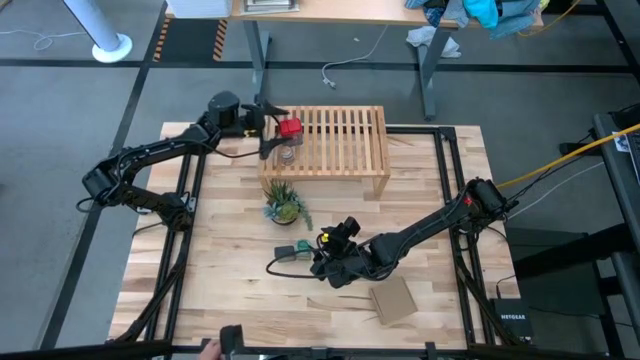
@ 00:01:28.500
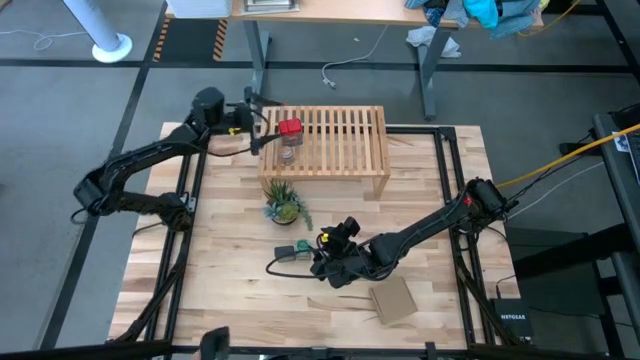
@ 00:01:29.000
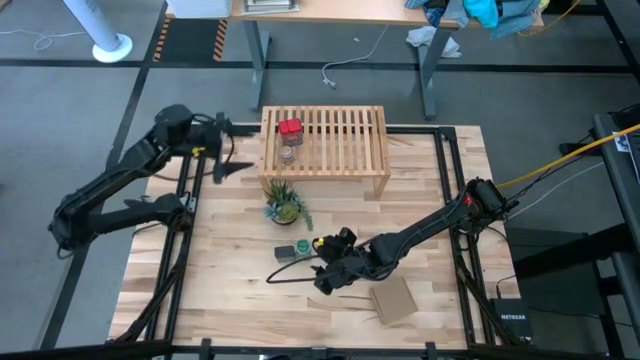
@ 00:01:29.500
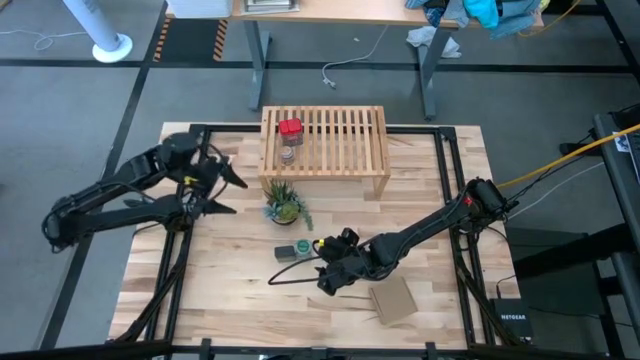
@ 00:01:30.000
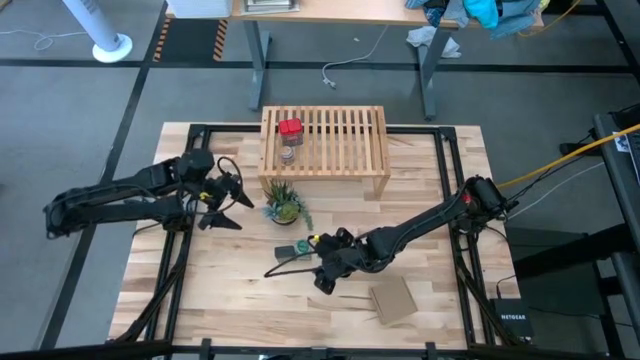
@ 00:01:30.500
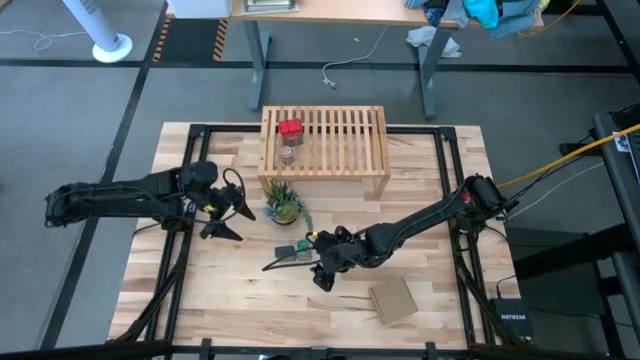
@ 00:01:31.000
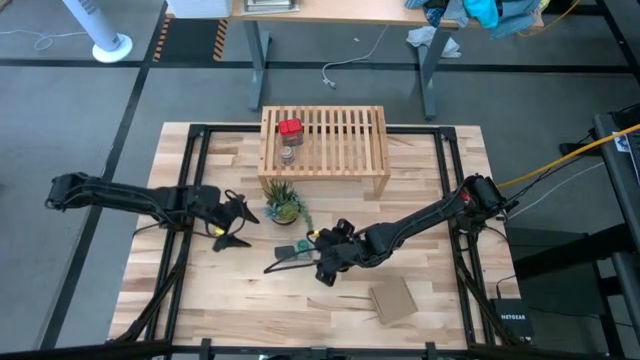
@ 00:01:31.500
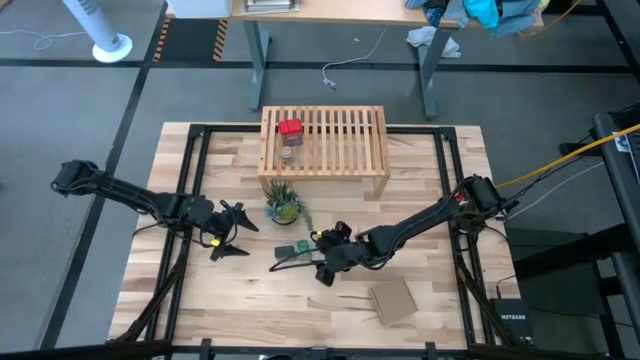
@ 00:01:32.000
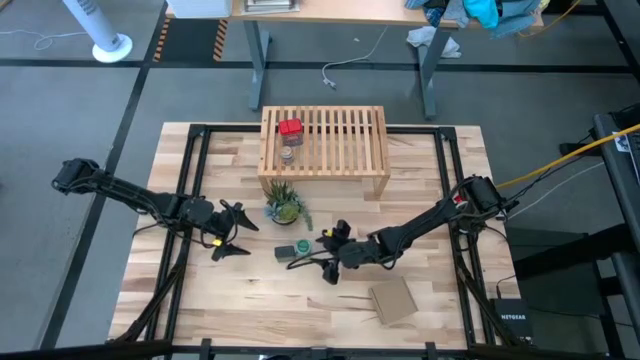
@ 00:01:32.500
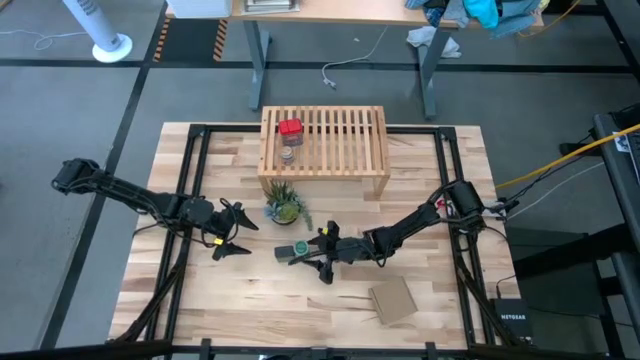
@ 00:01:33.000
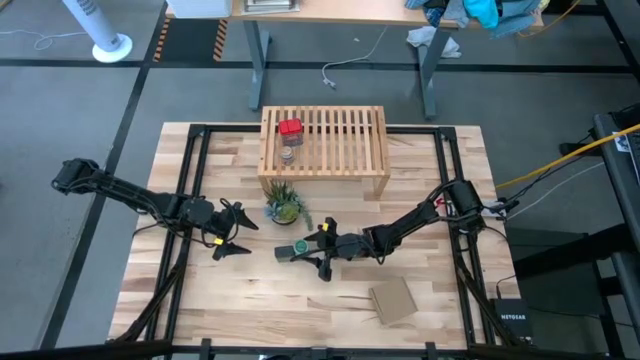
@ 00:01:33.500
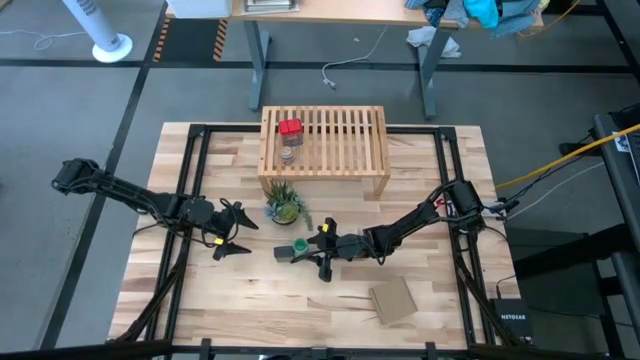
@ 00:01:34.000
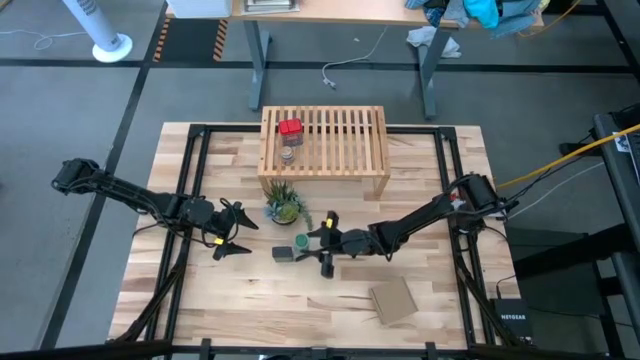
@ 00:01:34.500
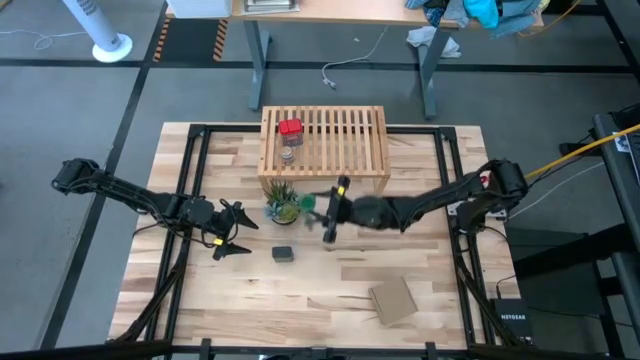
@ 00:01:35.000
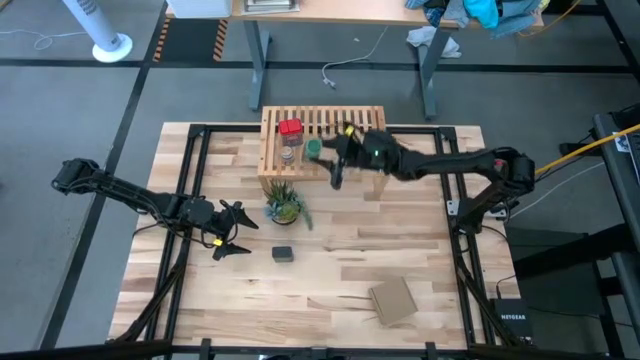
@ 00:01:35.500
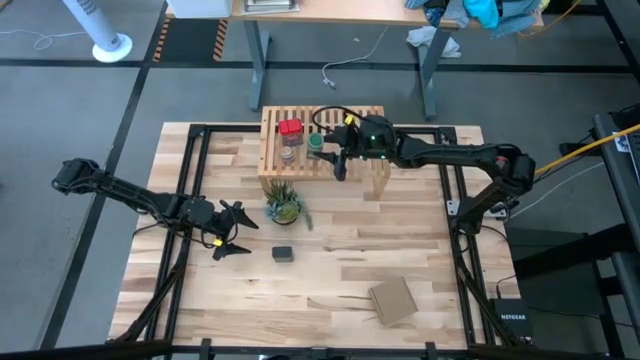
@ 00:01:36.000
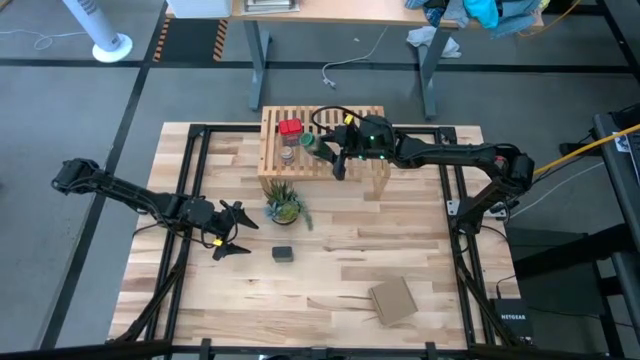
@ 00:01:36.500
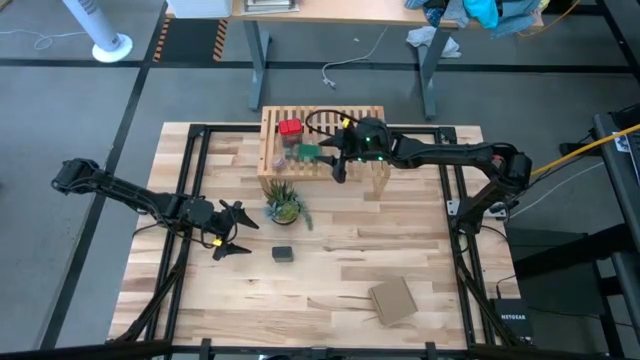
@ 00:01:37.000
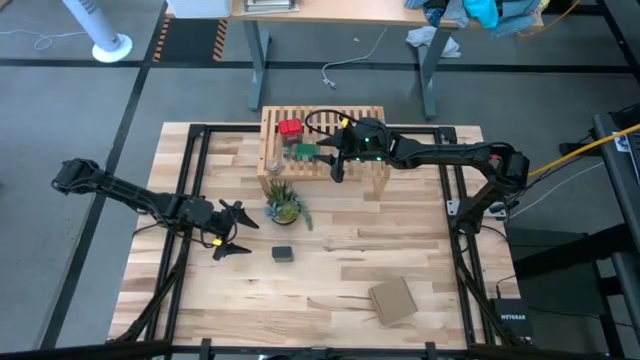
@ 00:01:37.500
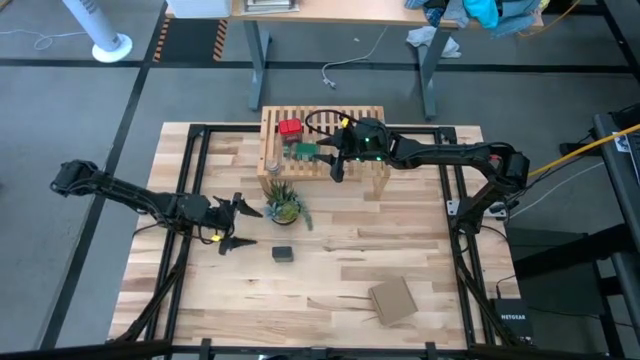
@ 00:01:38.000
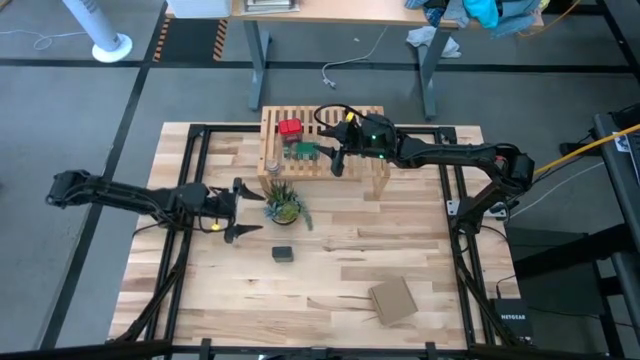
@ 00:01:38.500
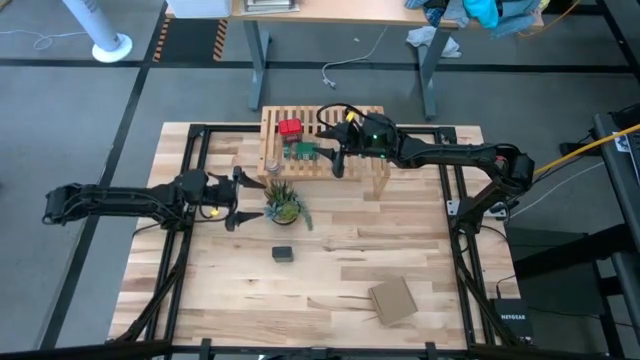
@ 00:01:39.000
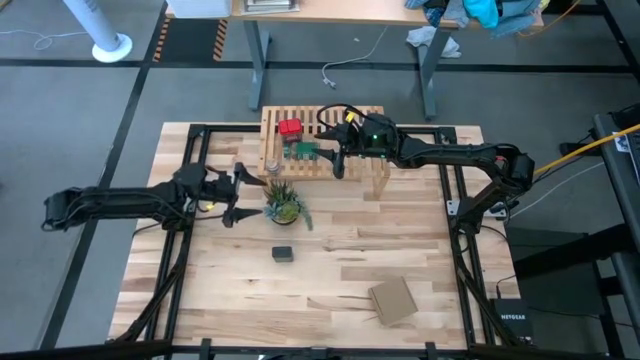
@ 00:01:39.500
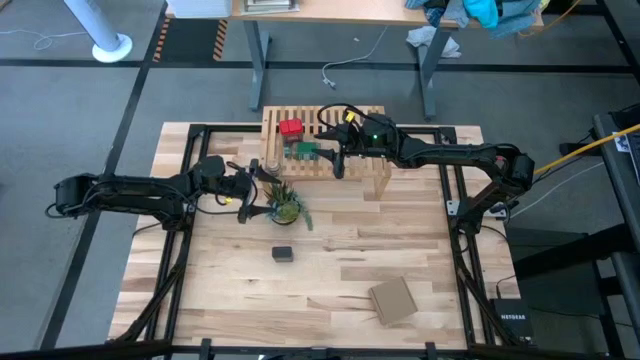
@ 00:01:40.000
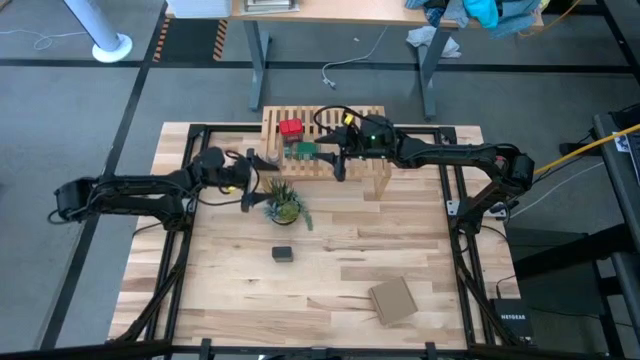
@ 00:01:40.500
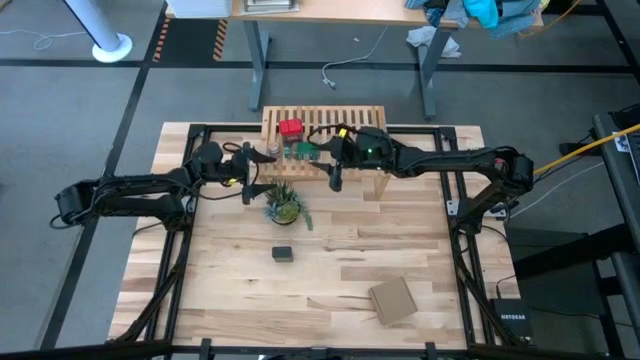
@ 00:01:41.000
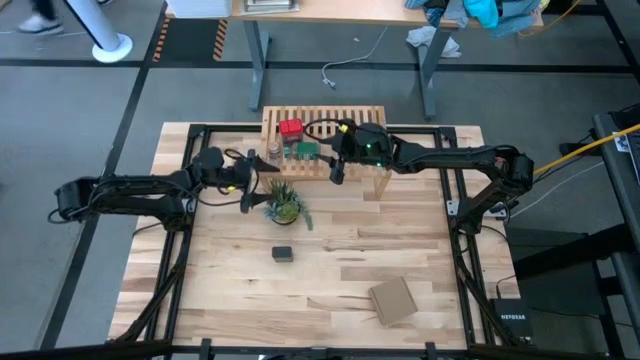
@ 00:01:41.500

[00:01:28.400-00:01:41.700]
Task: Shelf spices
Put the green seasoning bottle on the shelf
